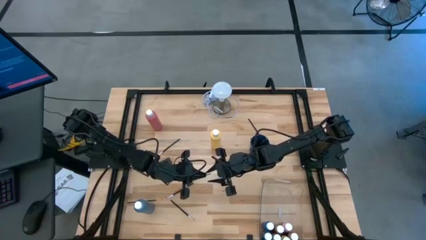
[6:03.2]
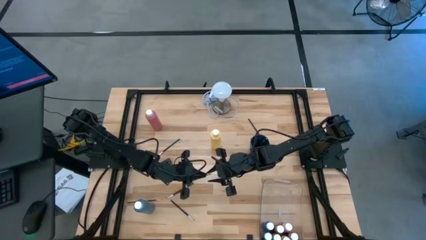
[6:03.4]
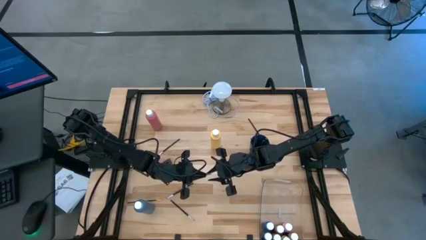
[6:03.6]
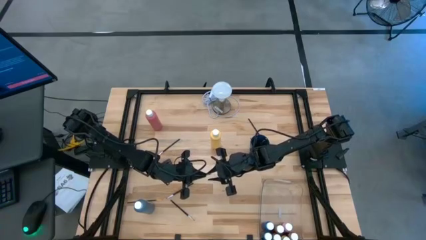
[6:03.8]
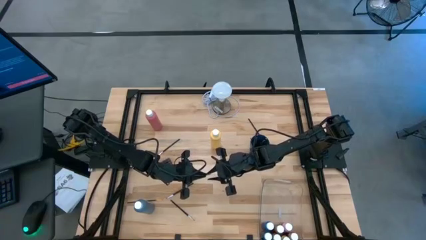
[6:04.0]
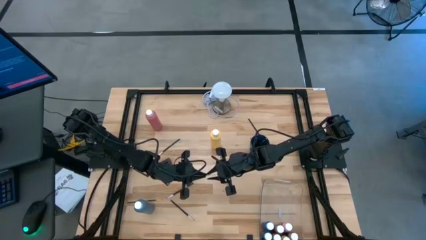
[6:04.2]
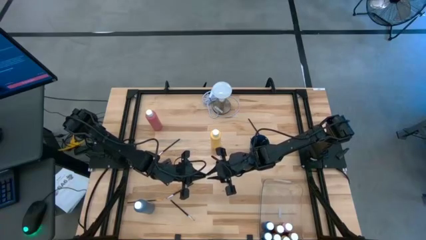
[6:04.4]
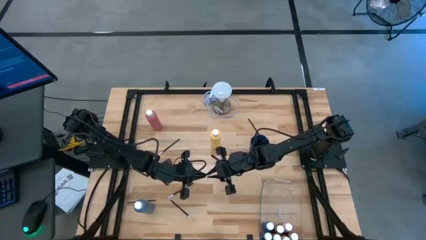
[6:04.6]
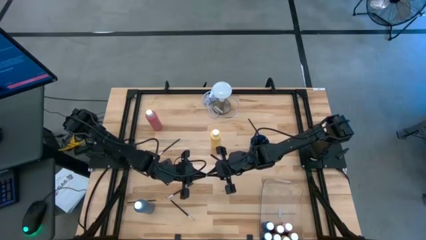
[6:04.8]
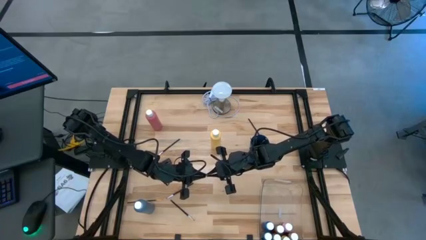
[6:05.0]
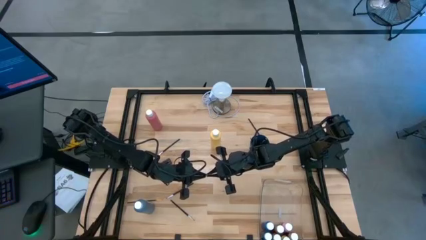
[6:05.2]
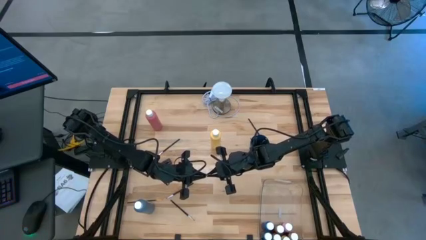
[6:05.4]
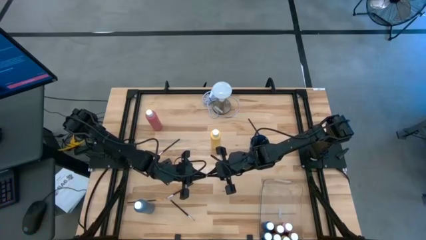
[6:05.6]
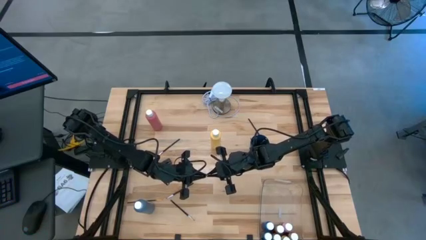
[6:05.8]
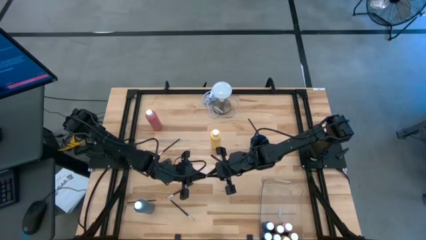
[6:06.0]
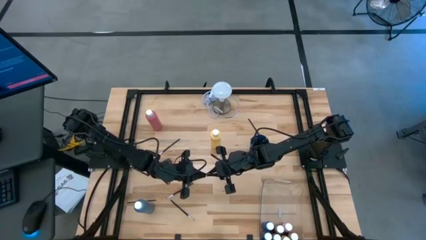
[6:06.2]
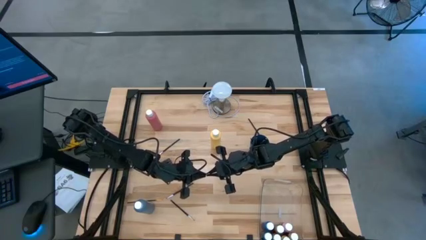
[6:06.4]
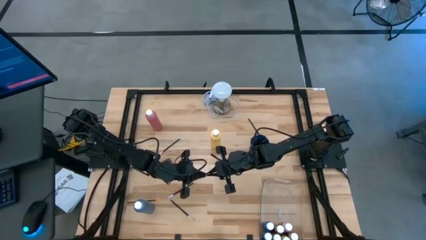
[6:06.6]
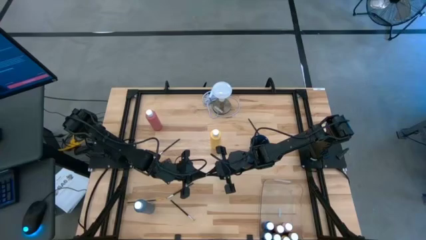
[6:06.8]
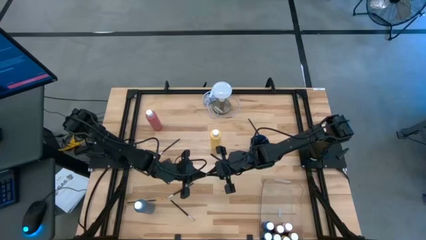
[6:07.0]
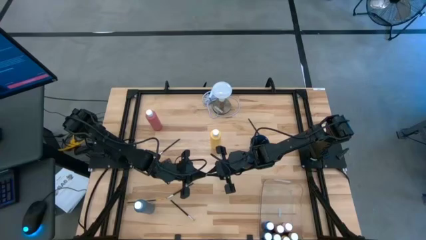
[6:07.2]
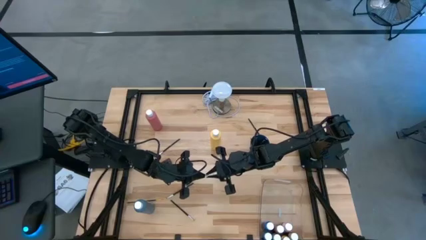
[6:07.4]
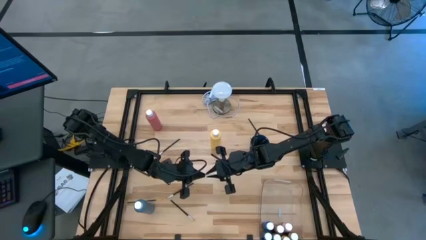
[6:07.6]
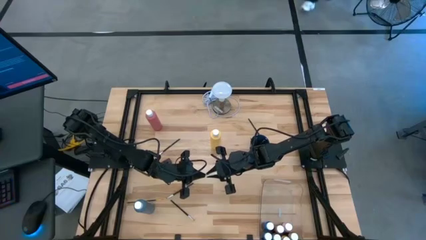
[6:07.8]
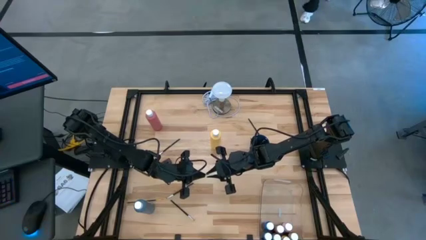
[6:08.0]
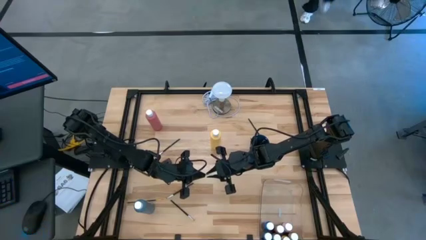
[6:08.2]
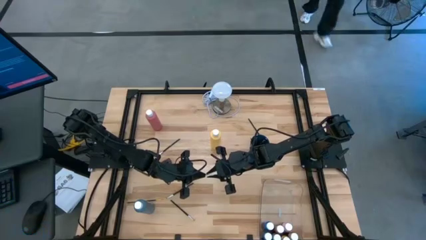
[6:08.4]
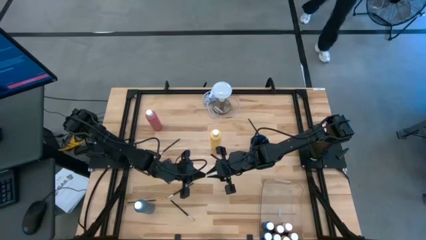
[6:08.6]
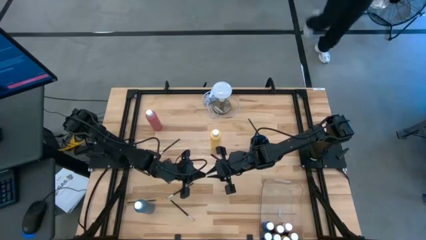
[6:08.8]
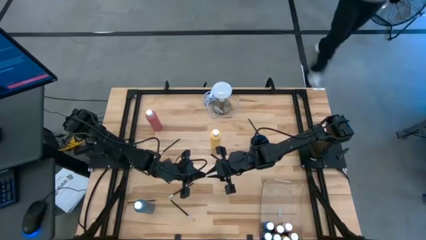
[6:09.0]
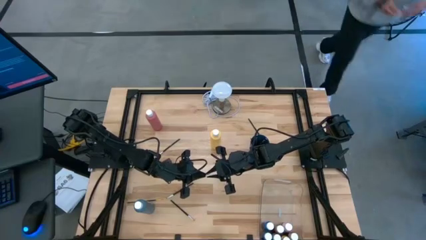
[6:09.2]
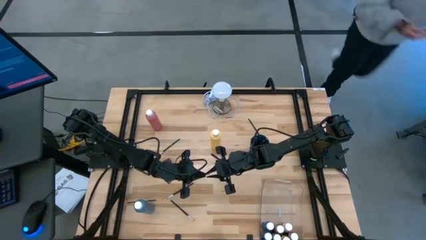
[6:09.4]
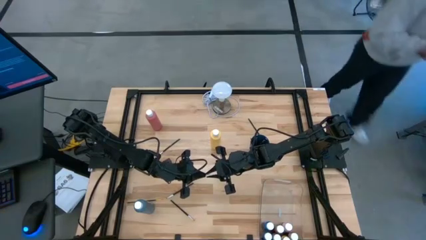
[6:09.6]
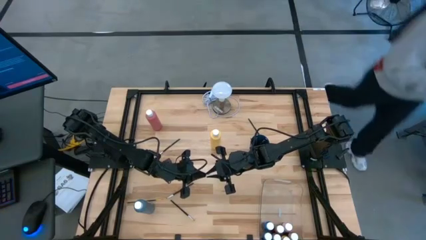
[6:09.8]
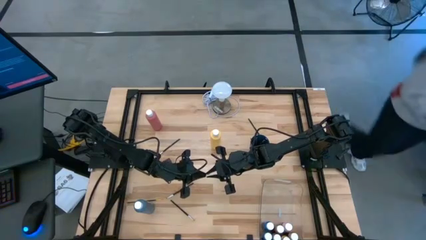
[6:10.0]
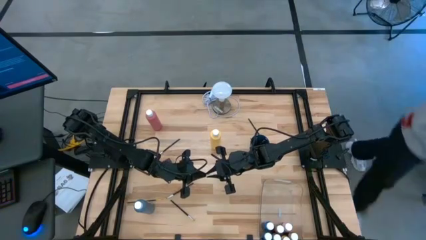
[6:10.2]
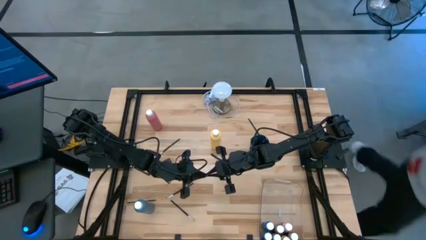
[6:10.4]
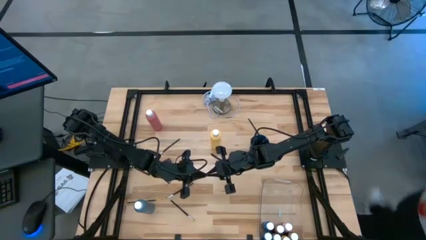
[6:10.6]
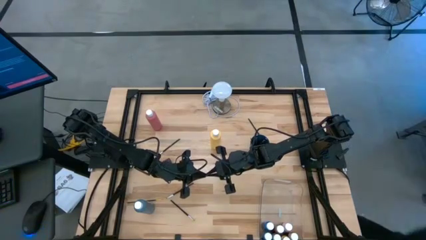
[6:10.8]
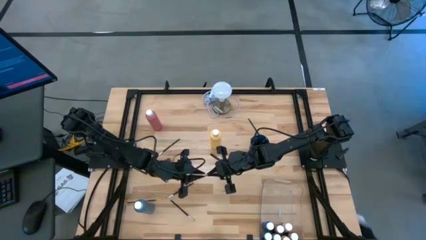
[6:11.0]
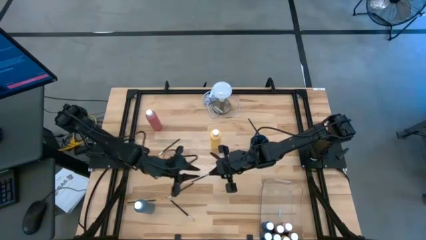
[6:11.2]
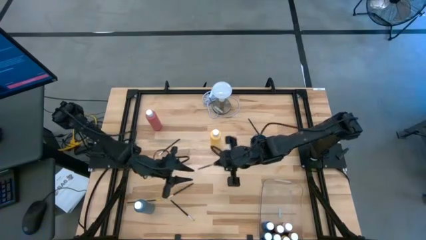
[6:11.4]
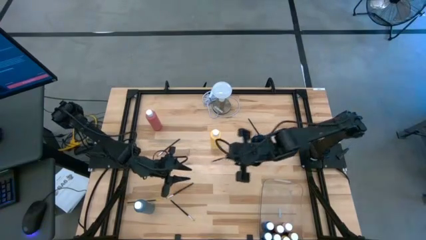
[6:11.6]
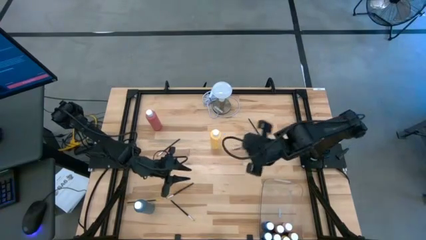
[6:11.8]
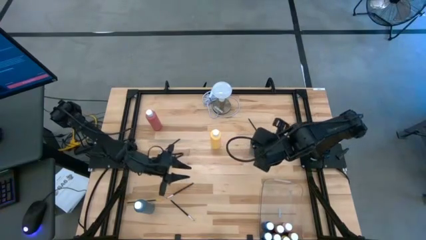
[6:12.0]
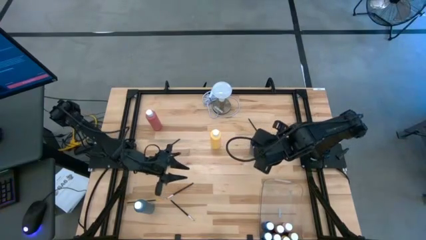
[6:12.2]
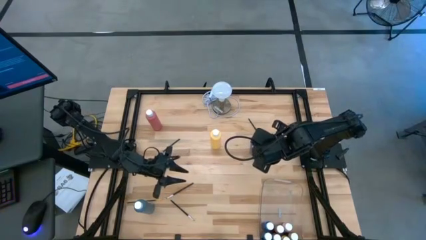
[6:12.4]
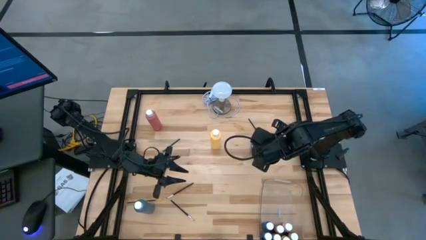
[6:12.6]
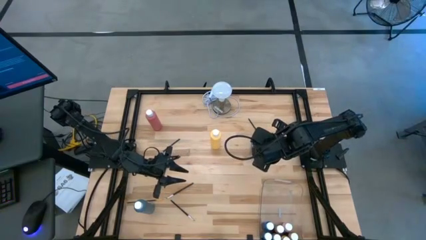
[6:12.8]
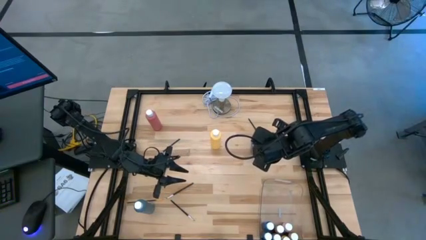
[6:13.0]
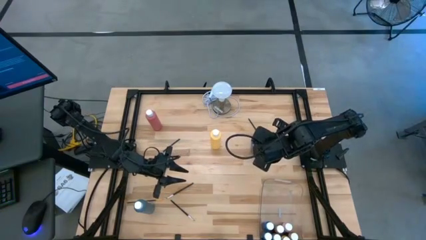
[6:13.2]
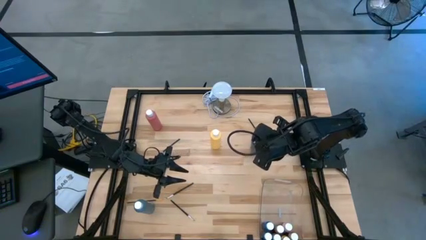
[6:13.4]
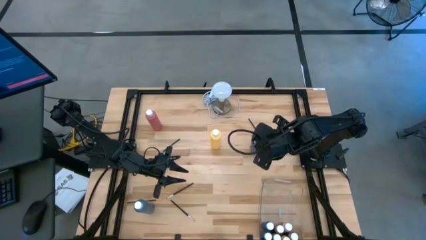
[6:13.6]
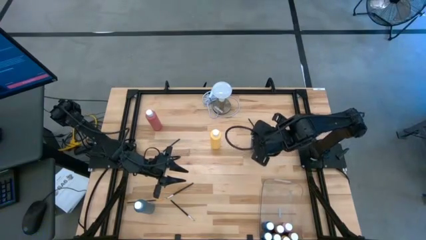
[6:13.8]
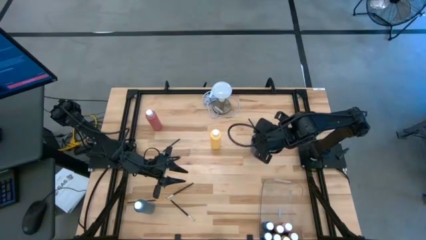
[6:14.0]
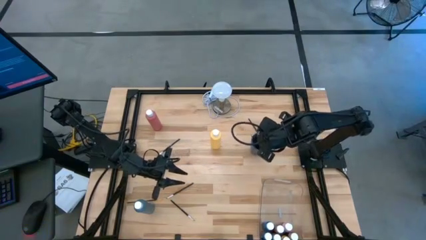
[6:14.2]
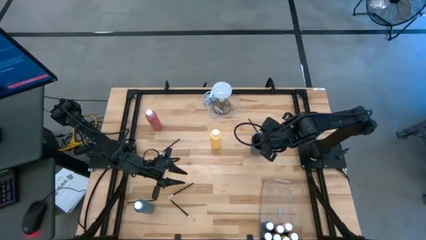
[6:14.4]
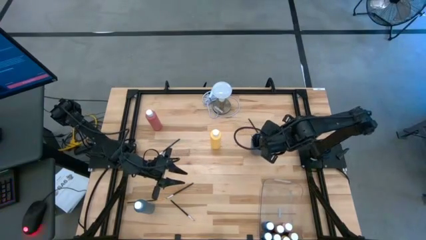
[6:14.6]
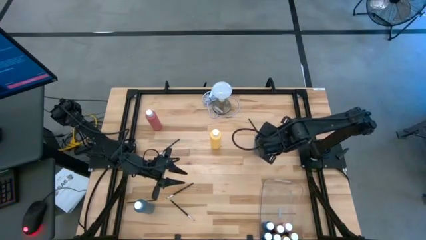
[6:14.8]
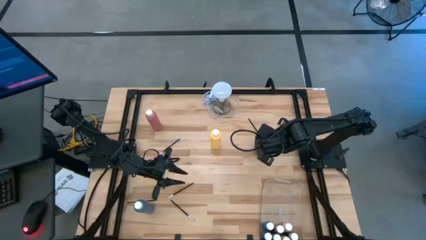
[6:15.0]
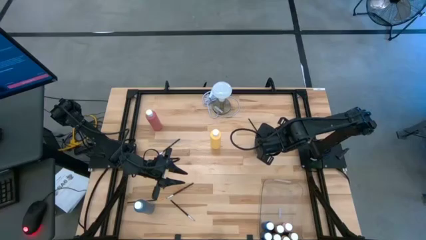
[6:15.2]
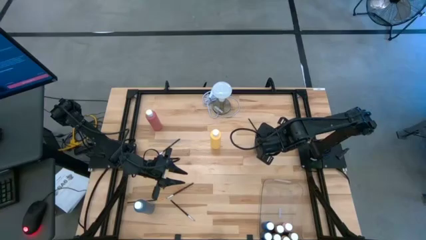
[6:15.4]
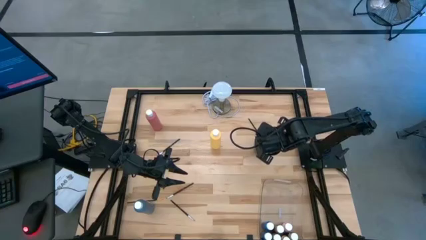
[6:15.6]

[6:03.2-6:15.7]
Task: Pick & Place Paint Supplies
Put the black silver paintbrush into the blue cup
